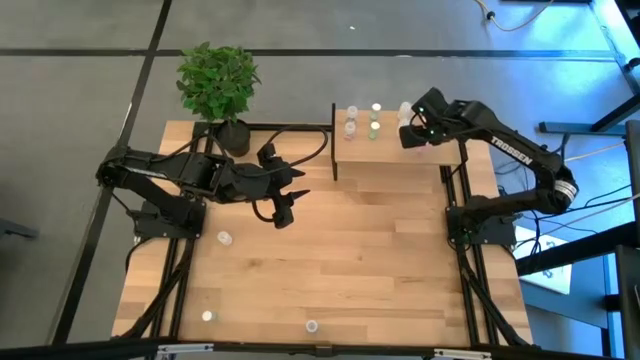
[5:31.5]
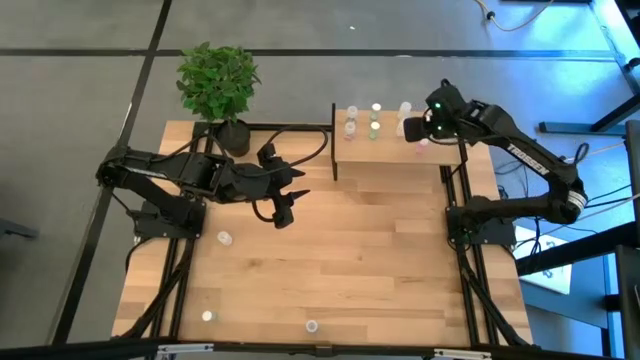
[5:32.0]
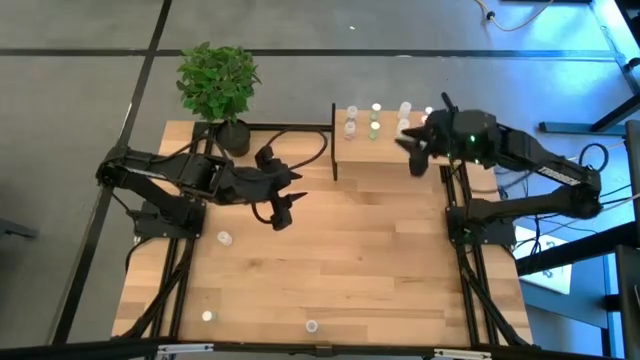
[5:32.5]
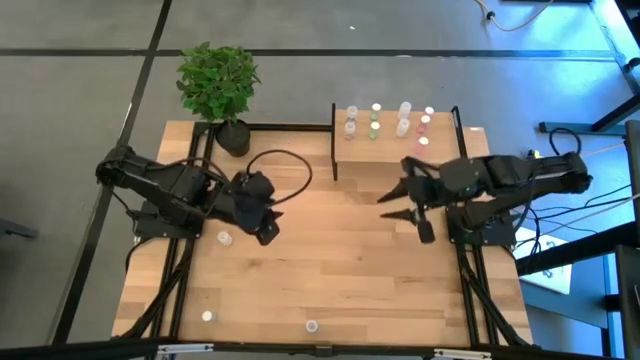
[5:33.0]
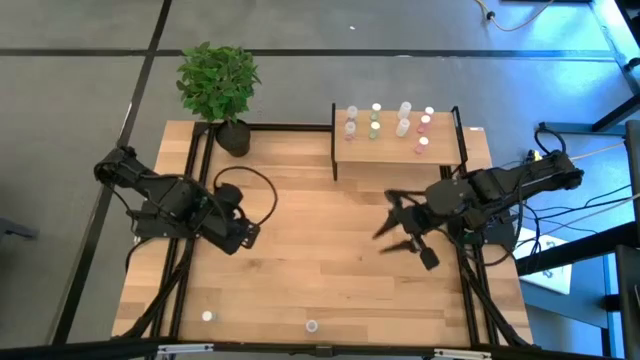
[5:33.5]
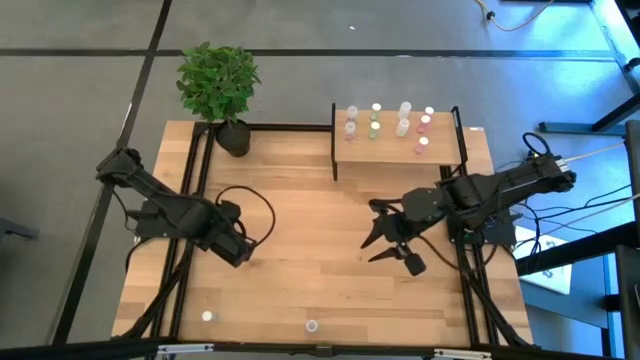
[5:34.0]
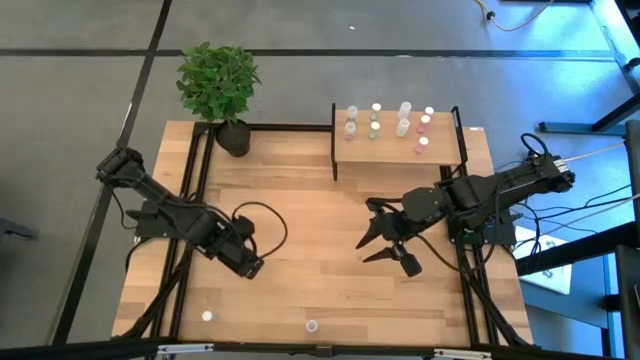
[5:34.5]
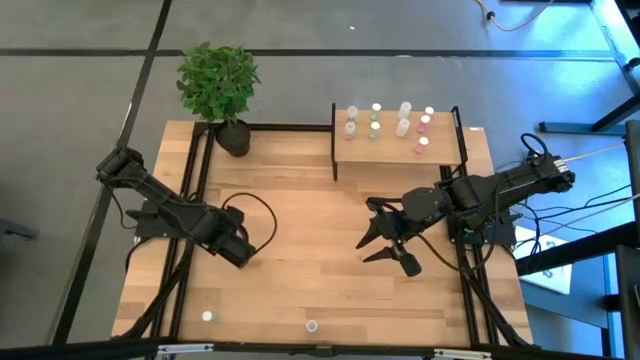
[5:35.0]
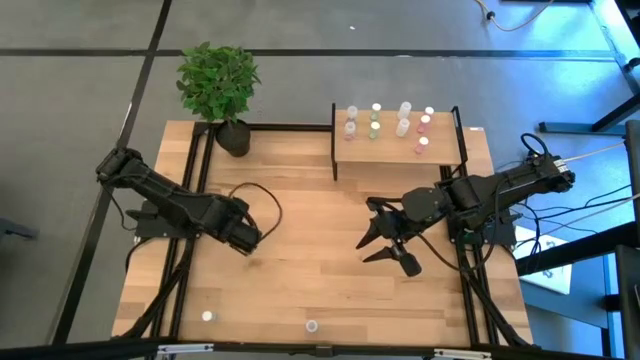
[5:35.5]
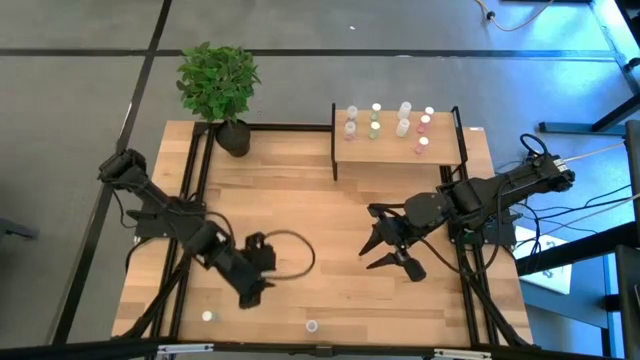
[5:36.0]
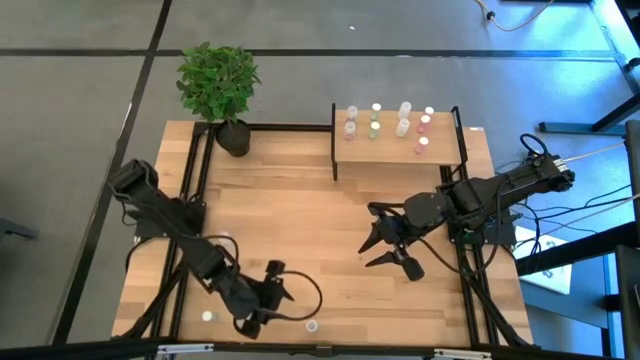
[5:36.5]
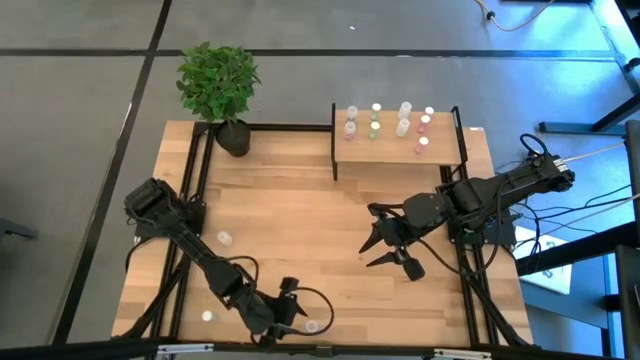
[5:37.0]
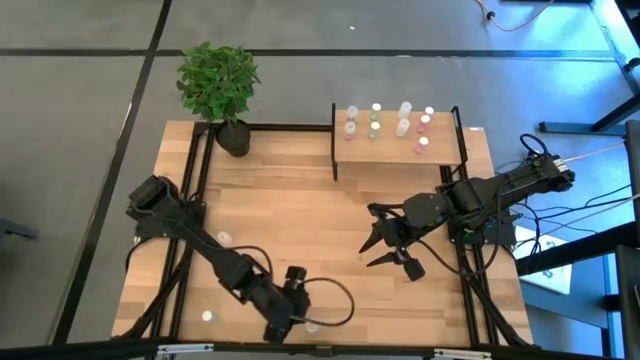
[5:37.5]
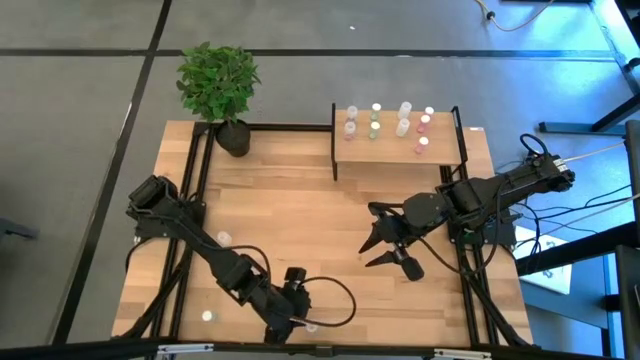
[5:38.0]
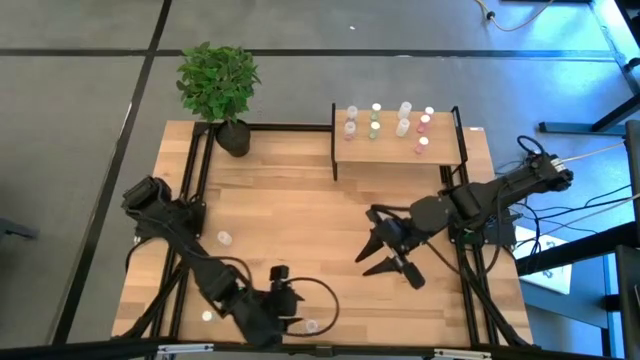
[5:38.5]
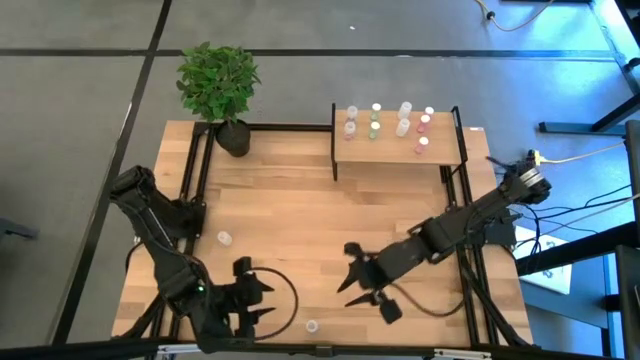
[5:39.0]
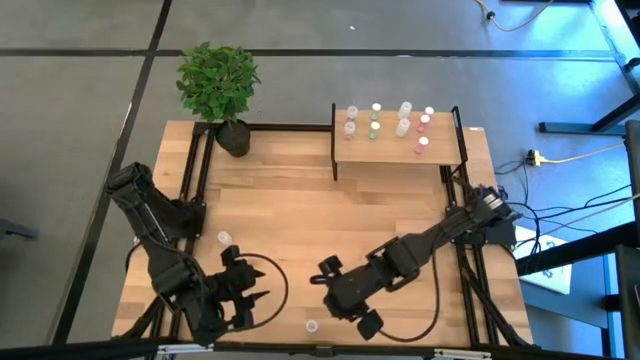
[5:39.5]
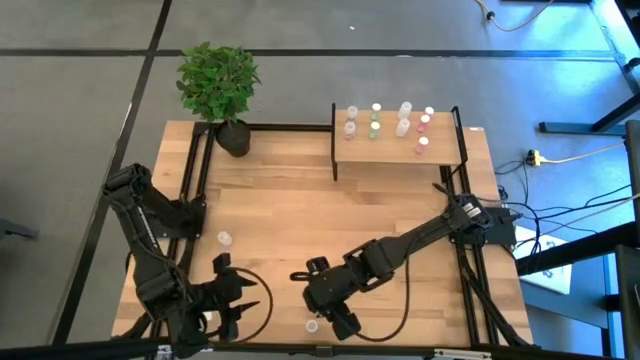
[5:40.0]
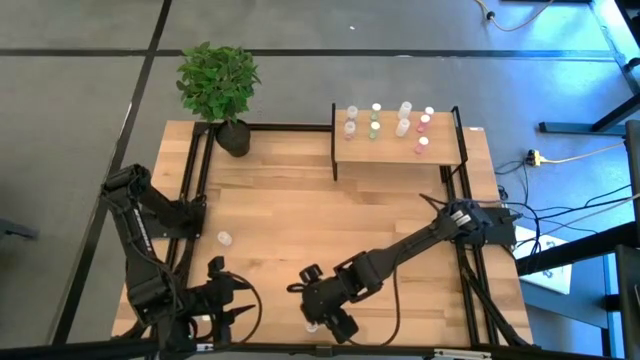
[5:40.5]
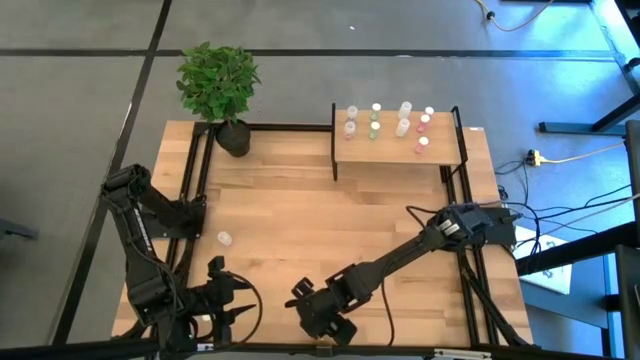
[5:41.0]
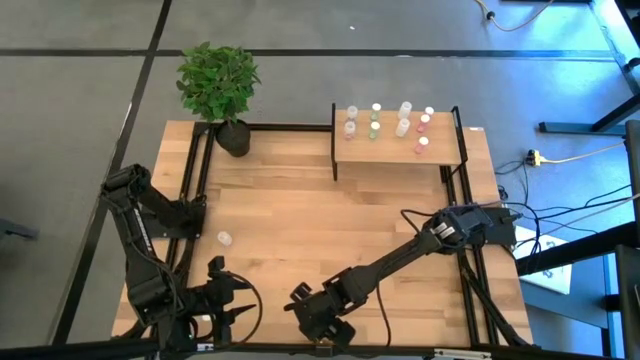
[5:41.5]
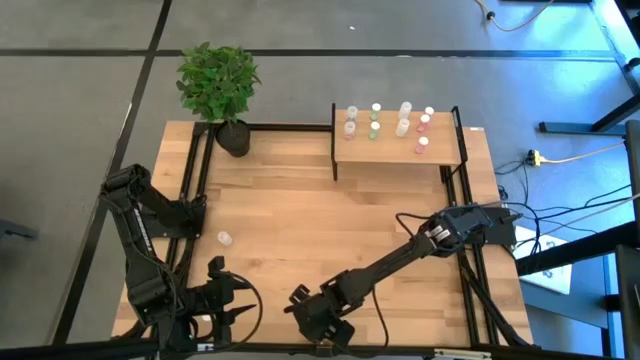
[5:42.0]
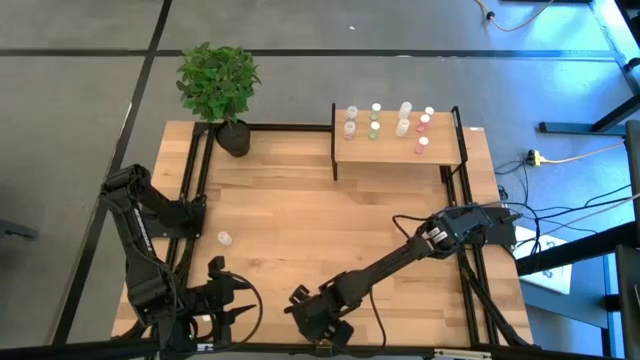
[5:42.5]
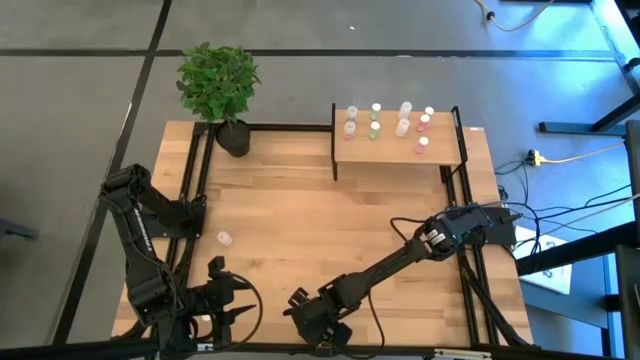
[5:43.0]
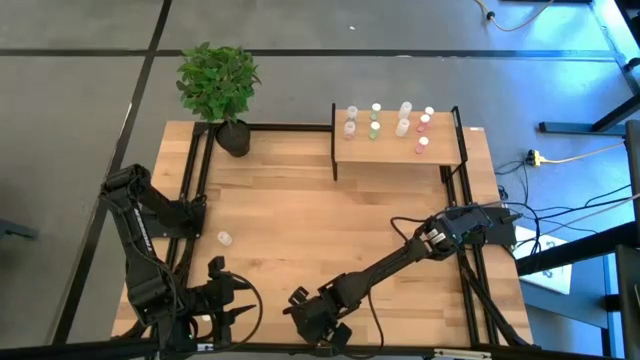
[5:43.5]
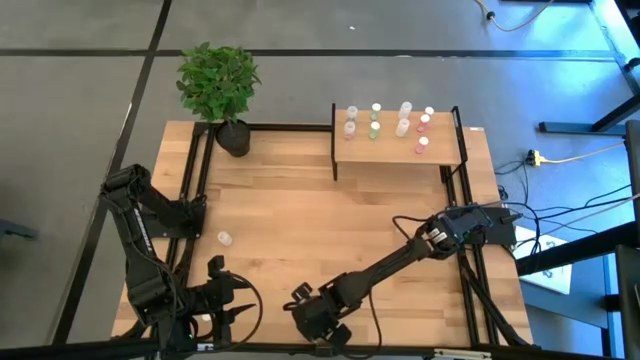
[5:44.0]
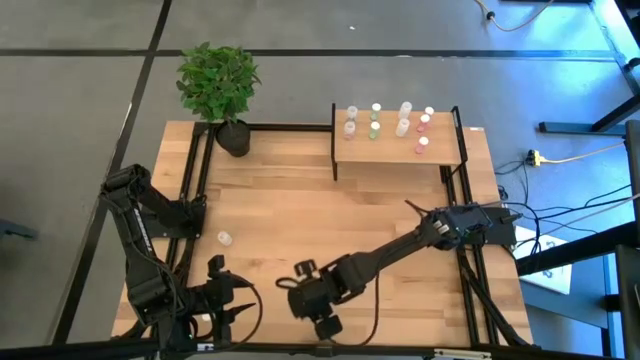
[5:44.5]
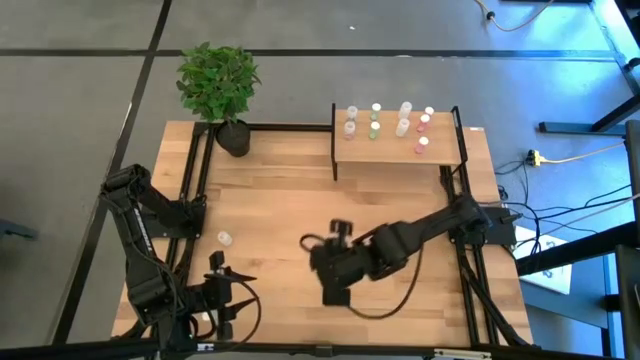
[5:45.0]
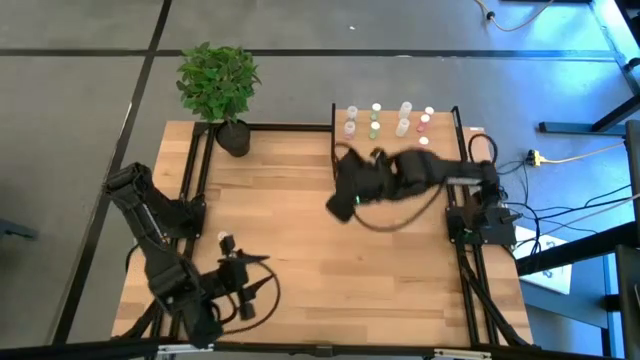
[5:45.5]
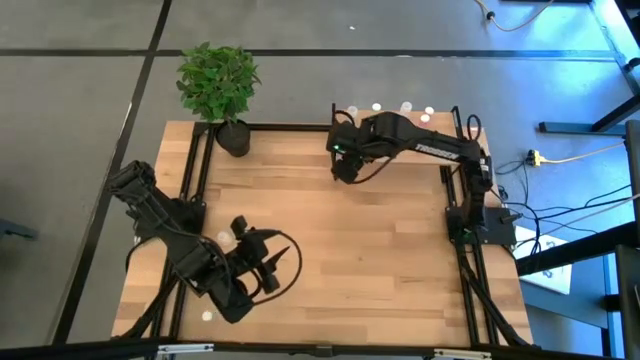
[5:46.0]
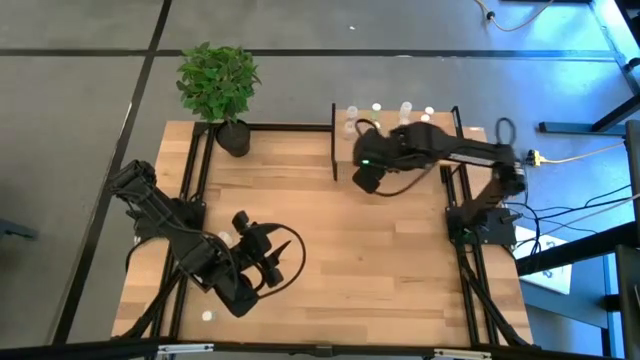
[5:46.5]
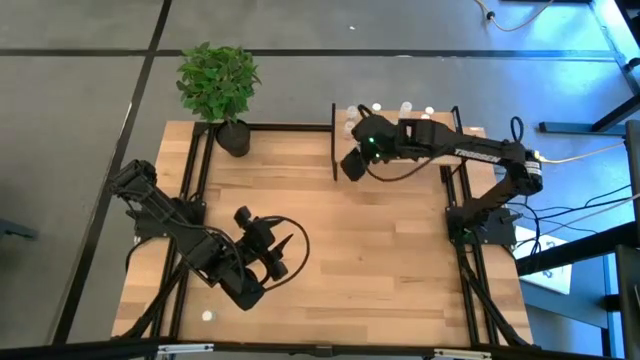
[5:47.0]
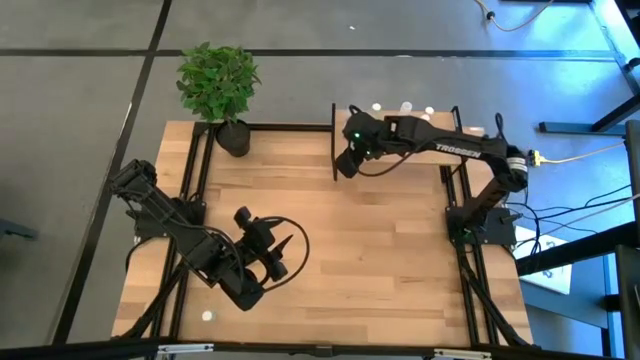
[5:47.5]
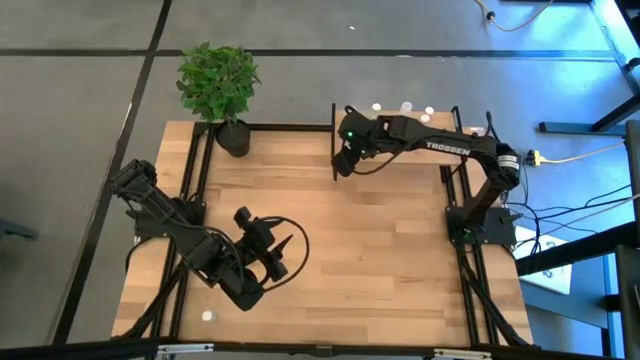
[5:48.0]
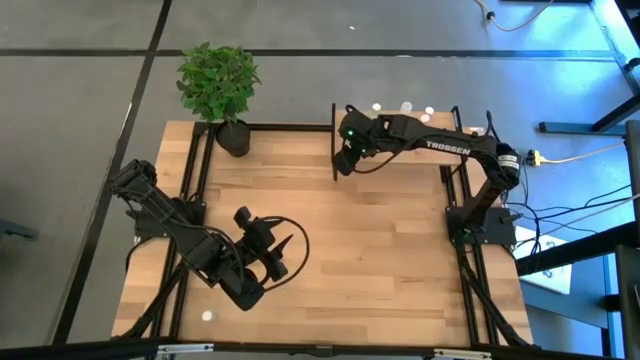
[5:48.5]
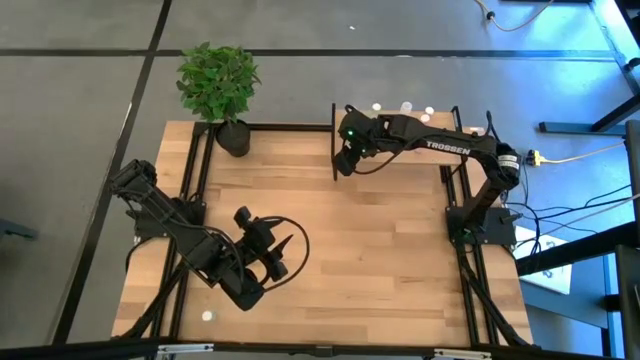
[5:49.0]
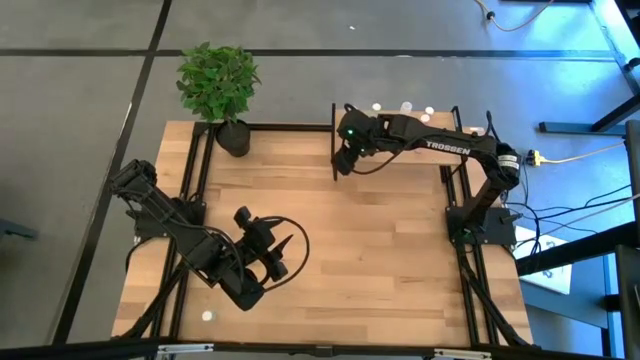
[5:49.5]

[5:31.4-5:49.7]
Task: Pick and place medicine bottles onto shelf by color
Put the transparent pill bottle aligned with the other transparent pill bottles on the shelf
